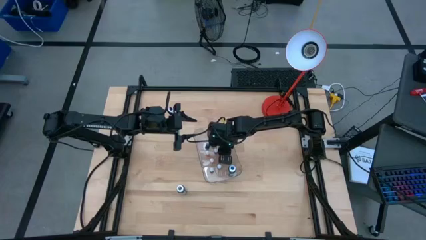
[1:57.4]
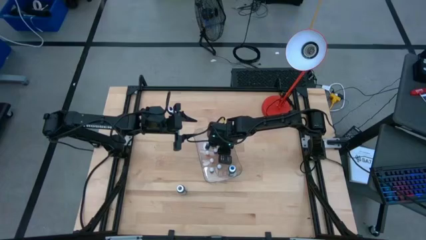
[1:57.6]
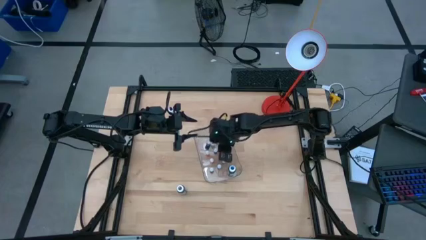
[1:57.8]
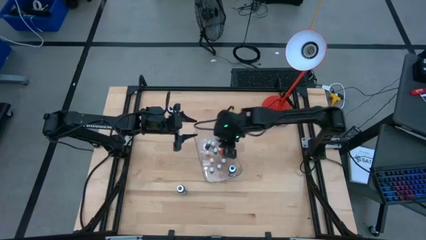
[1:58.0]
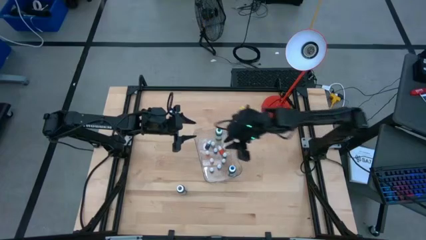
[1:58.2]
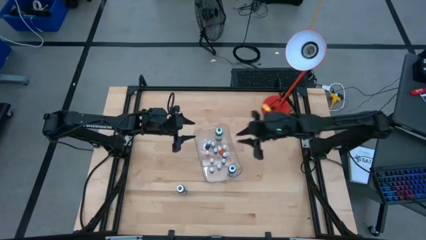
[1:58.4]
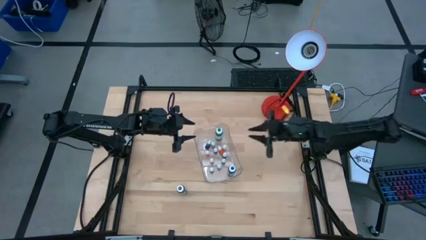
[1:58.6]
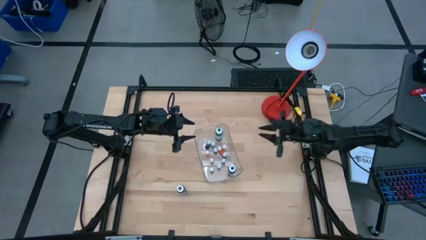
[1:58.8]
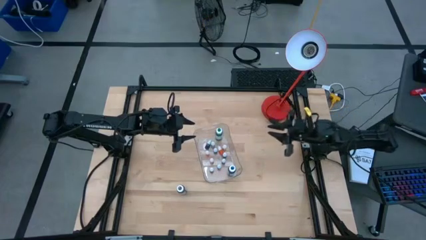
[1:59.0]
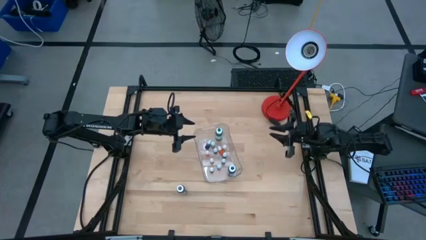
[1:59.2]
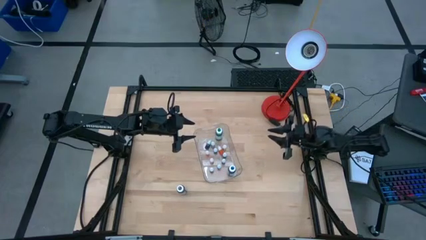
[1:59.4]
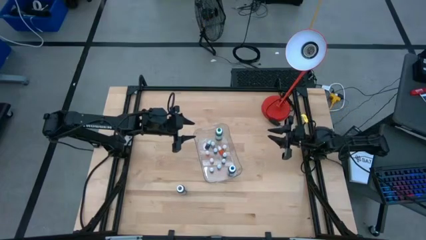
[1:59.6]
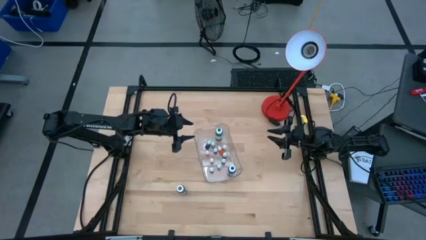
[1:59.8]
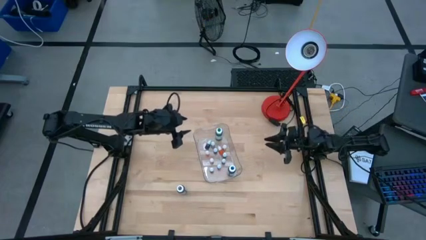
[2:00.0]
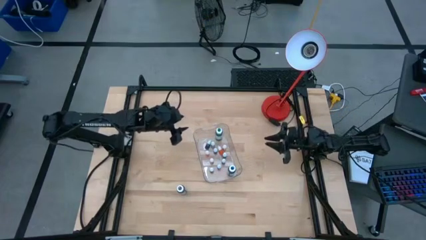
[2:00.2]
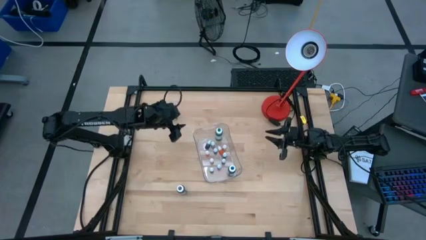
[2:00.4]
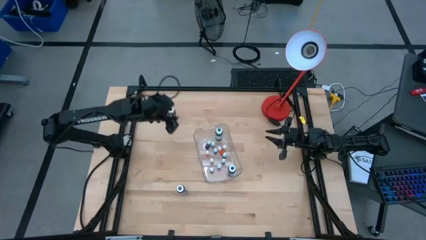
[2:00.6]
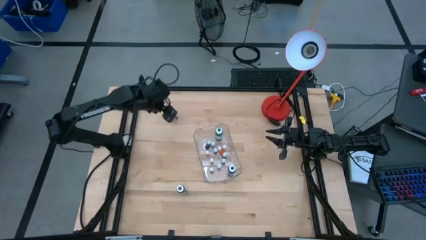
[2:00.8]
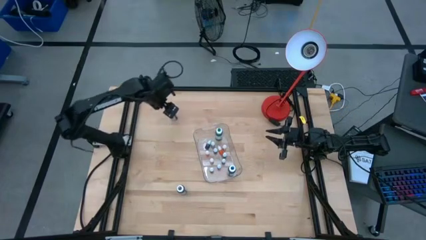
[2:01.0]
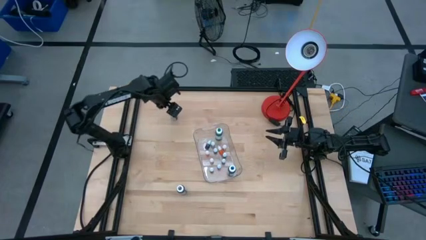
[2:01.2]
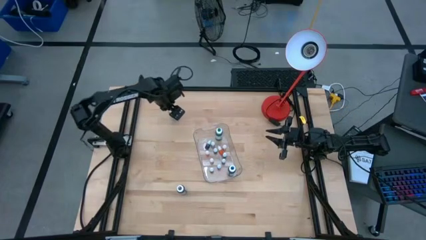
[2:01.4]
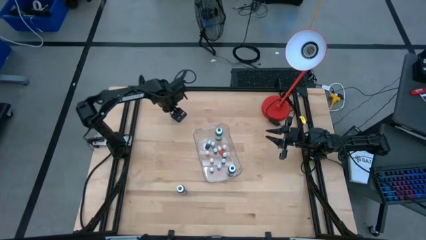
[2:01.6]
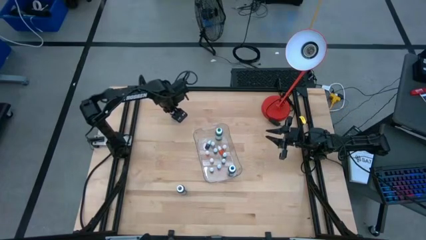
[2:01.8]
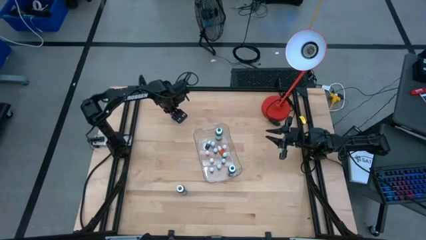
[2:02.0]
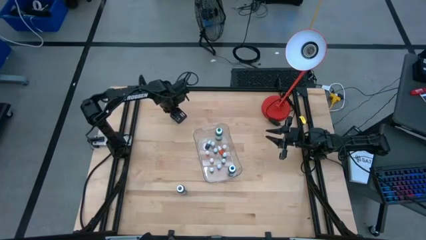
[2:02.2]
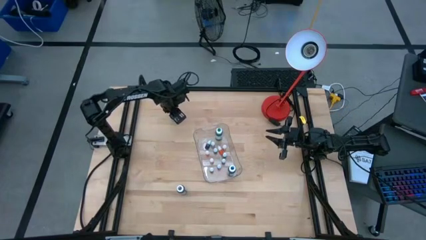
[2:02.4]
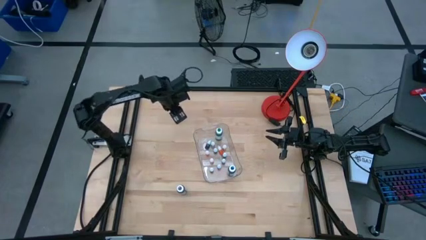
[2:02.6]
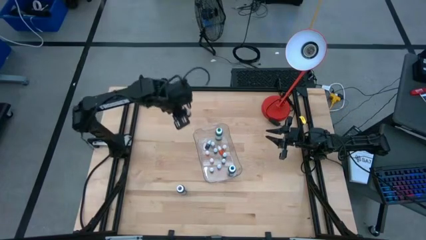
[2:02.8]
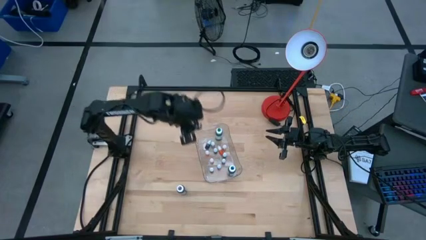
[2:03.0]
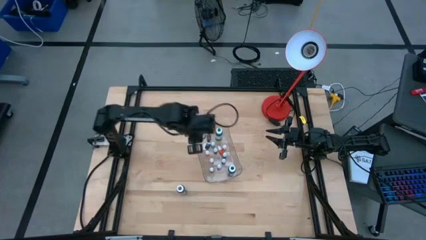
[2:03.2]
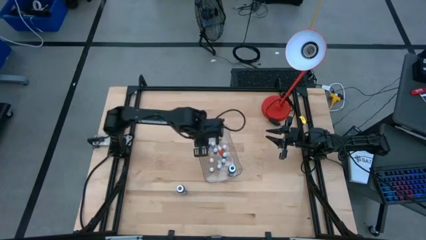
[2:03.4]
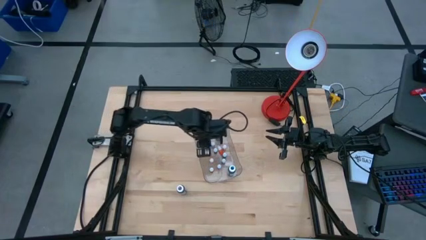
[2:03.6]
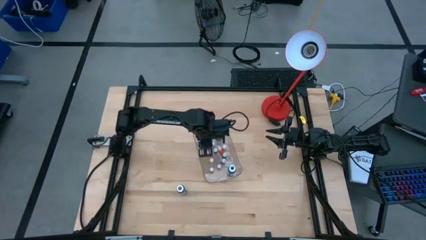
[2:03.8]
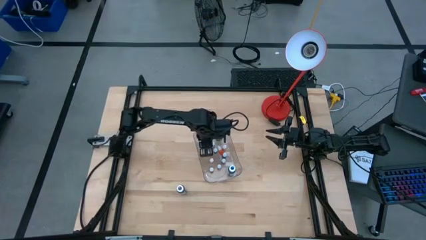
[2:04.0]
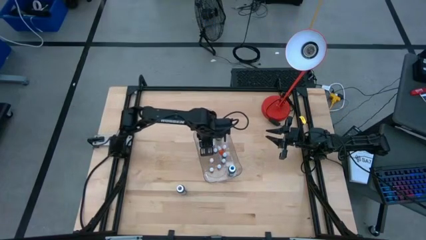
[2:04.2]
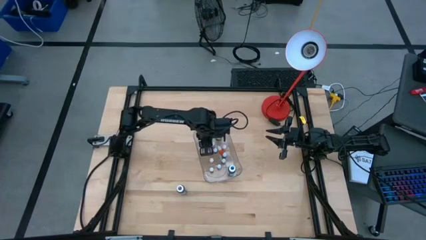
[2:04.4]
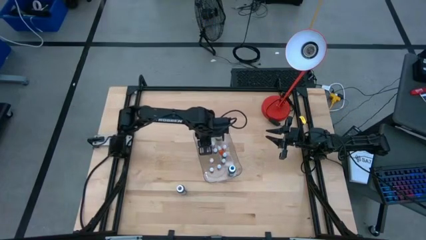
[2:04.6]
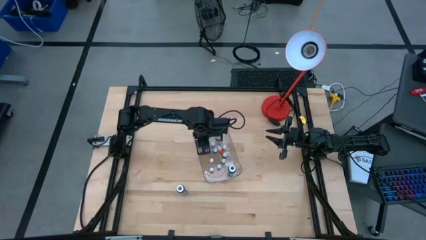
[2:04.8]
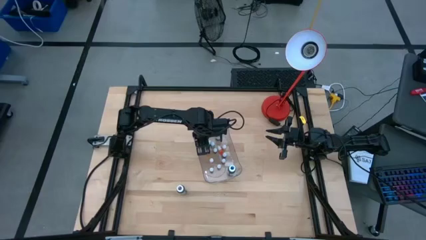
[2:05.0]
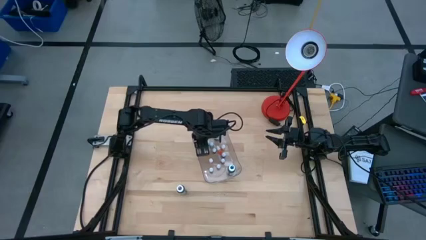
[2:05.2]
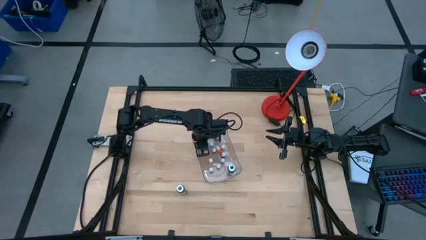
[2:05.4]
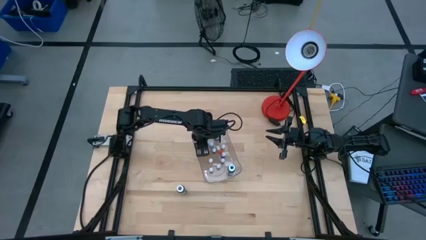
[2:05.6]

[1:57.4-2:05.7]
Task: Pick & Place food coloring
Put the big black food coloring bottle into the transparent bin

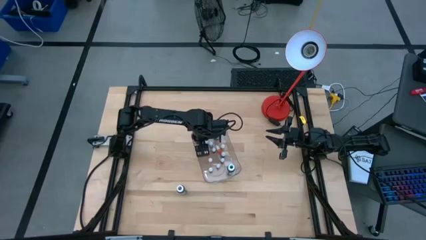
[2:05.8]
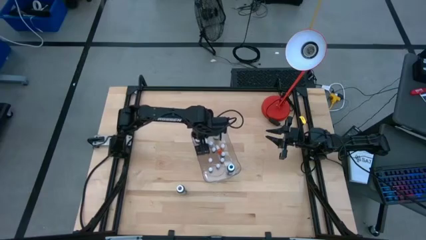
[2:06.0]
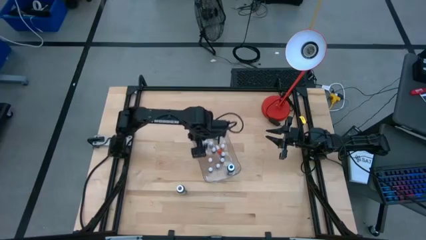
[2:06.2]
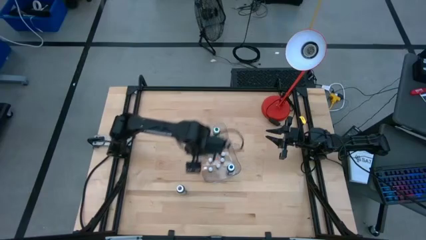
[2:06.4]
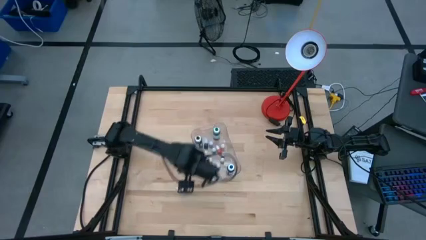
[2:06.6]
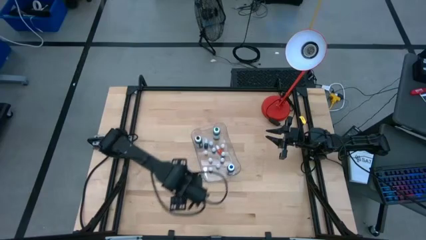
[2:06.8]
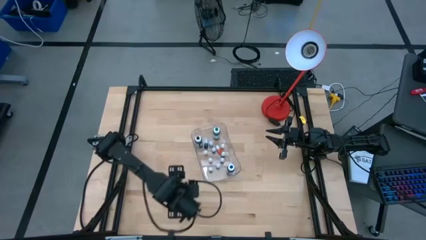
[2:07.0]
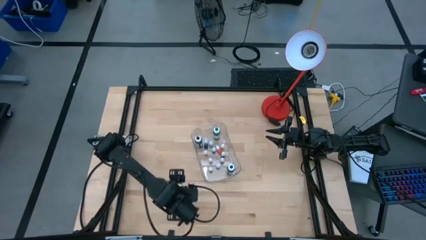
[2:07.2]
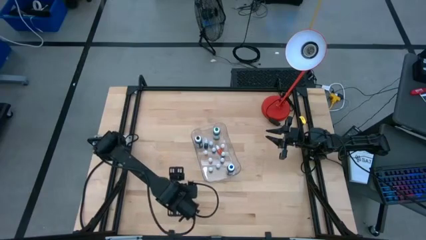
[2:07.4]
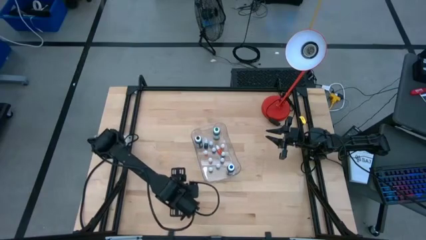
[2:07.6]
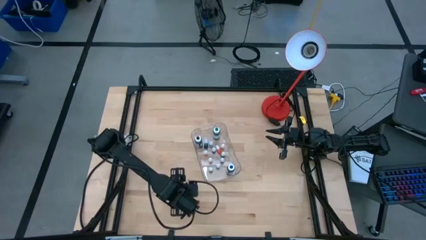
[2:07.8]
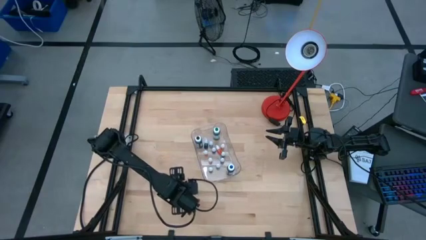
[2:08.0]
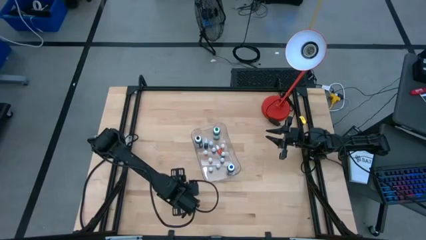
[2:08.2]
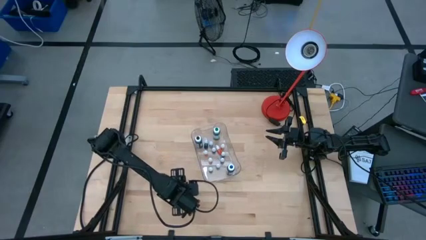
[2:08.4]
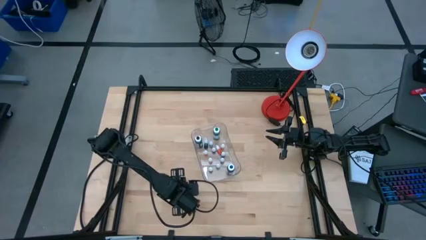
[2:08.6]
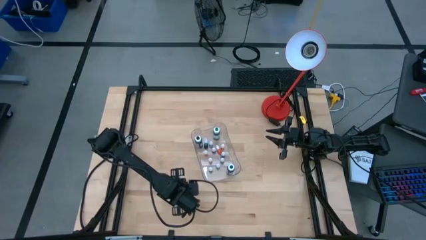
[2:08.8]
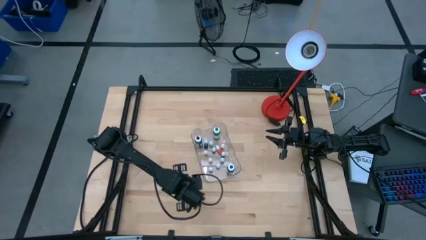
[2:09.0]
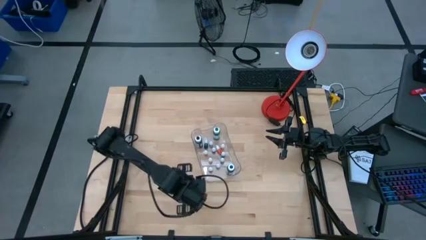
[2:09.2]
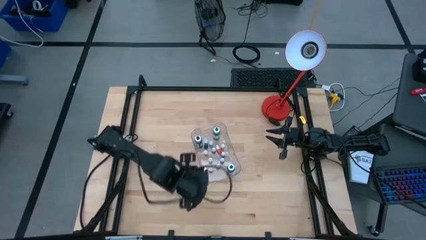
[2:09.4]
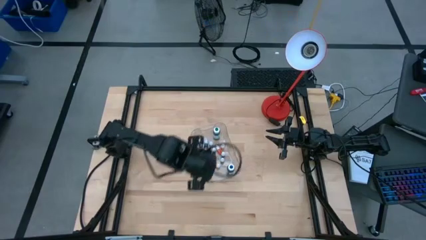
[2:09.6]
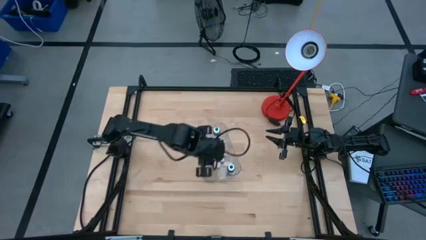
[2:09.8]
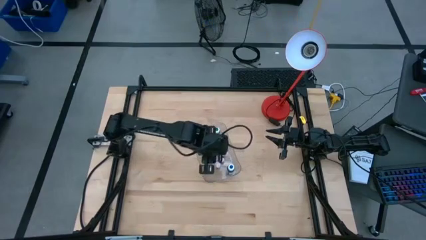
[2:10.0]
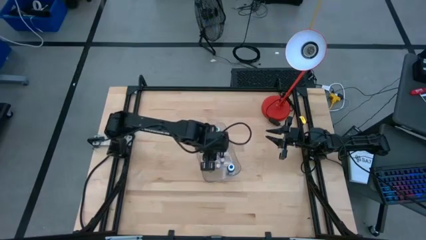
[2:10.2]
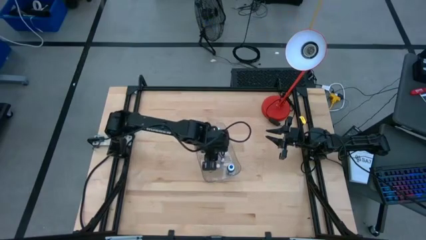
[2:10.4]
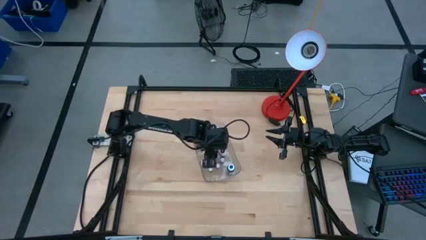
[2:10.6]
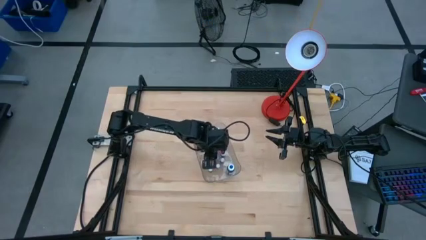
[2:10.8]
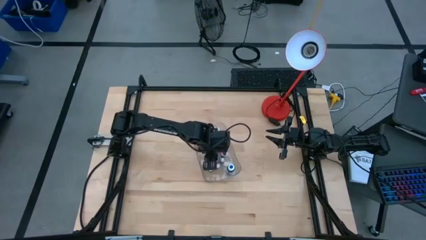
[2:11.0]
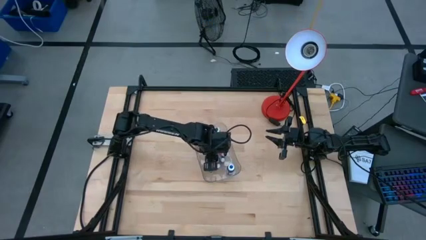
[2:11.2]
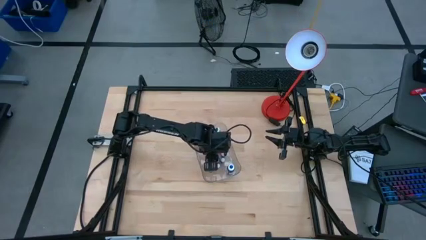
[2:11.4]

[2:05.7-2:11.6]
Put the big purple food coloring bottle into the transparent bin

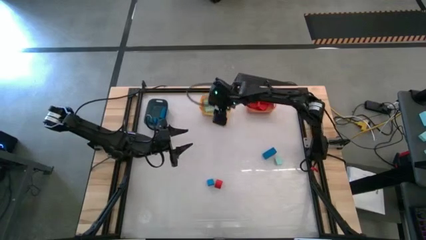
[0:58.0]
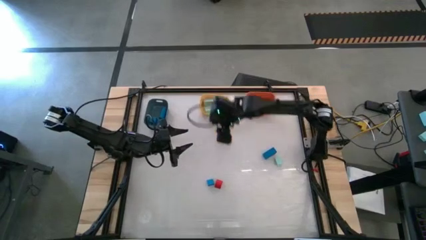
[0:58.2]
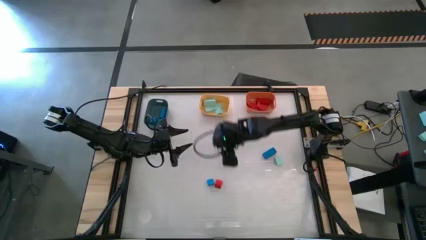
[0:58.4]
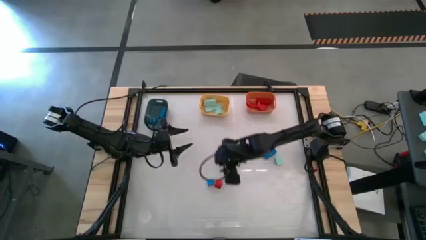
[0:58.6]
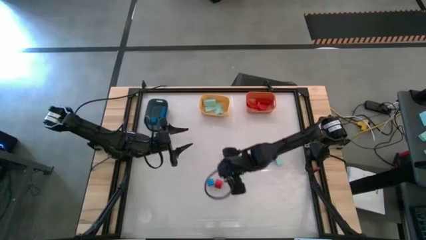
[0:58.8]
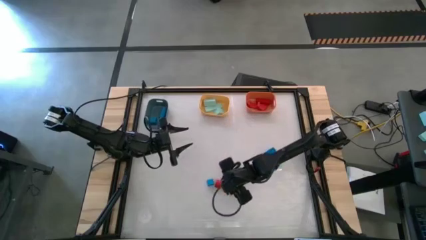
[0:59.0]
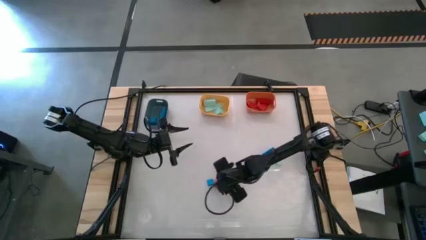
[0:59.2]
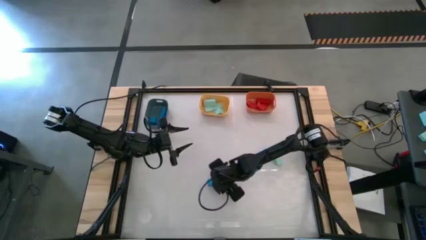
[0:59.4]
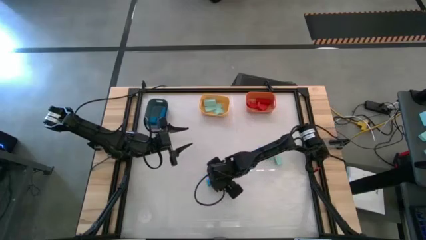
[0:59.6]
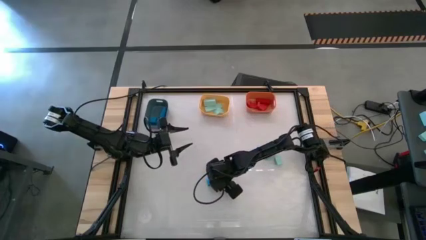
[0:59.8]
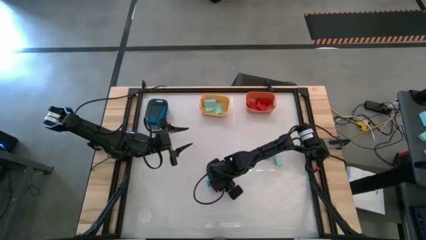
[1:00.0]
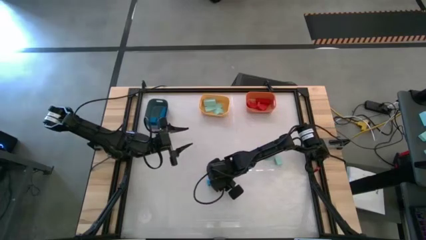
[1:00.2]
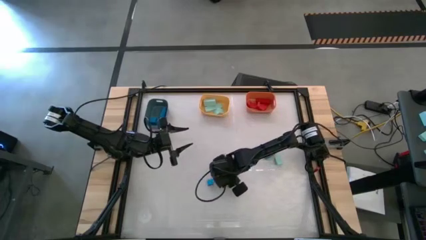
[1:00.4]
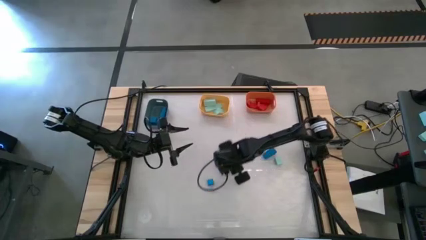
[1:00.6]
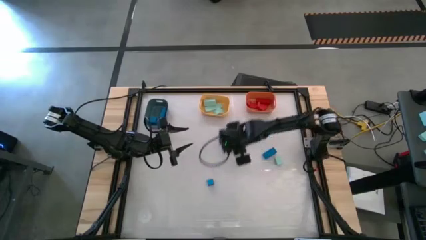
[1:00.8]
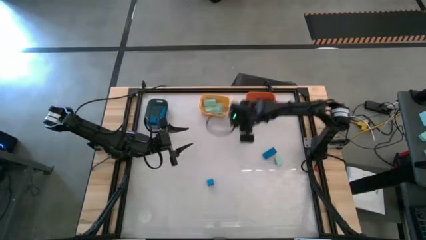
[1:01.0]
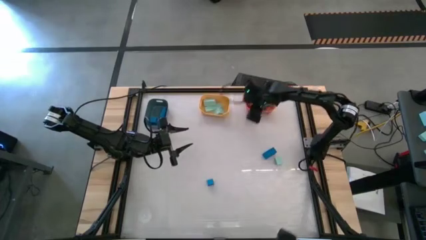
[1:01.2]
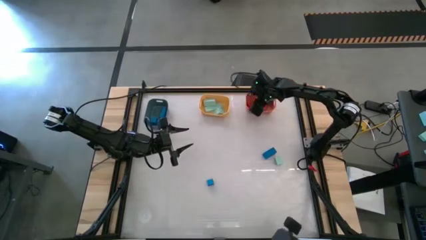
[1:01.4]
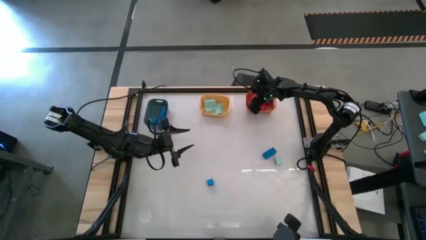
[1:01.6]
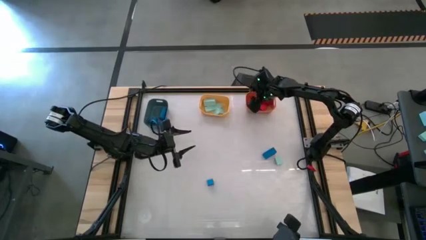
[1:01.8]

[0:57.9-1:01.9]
Task: Sort & place blocks by color
Put the red half circle block into the orange bin
